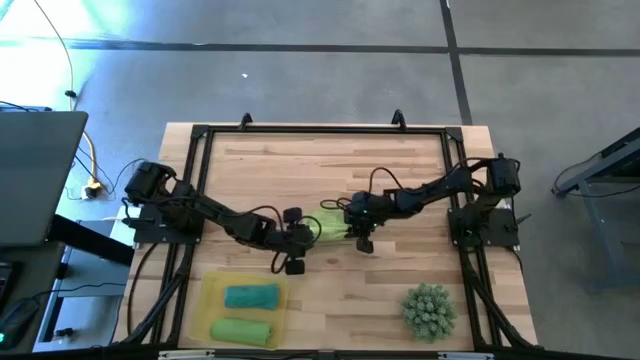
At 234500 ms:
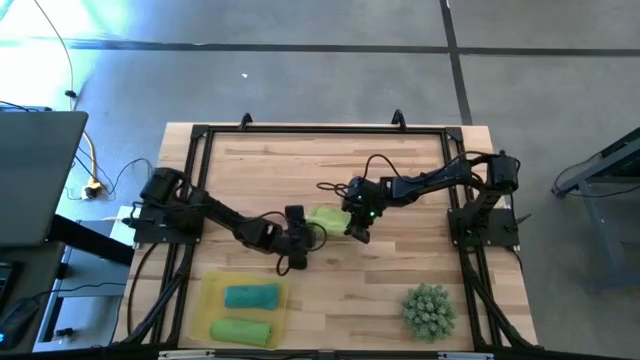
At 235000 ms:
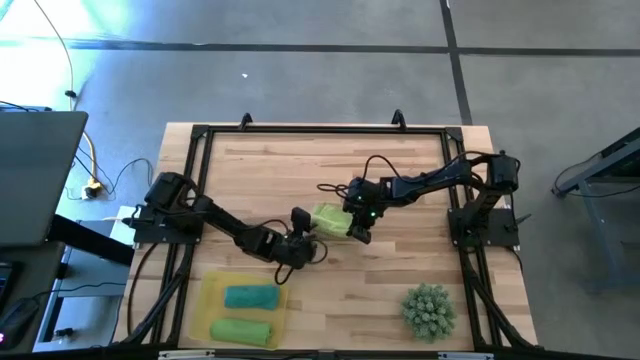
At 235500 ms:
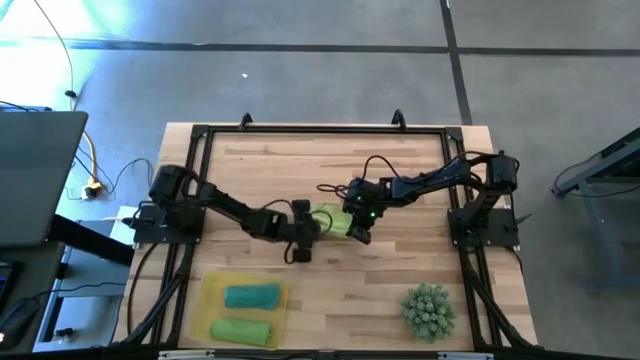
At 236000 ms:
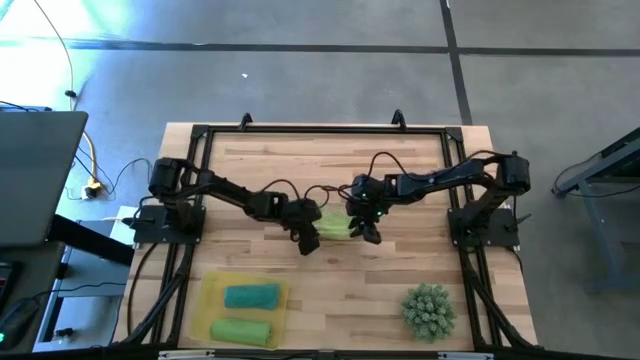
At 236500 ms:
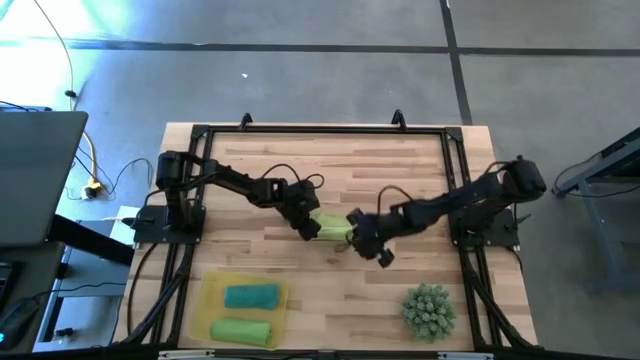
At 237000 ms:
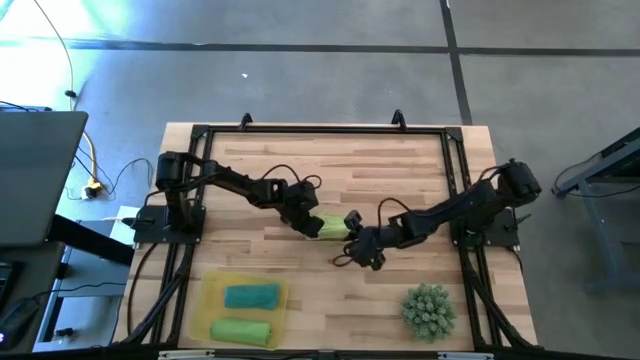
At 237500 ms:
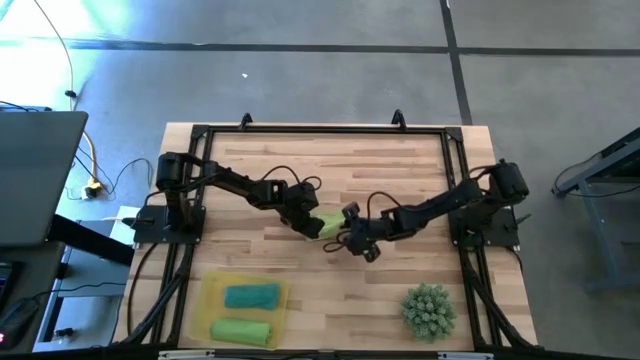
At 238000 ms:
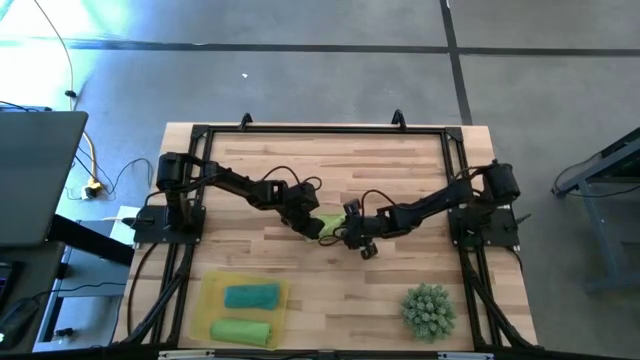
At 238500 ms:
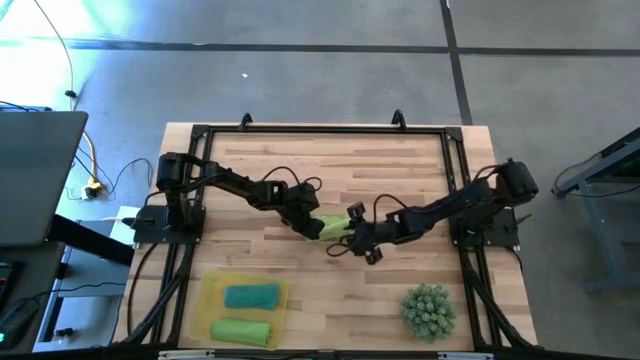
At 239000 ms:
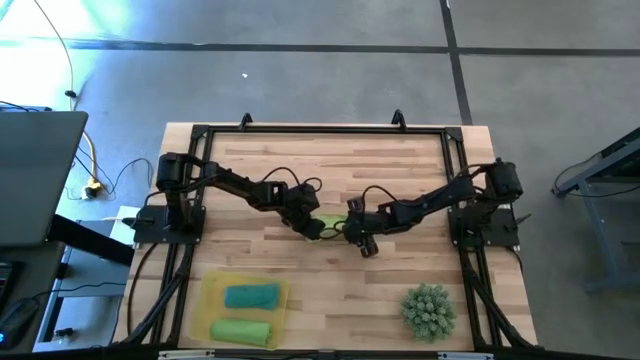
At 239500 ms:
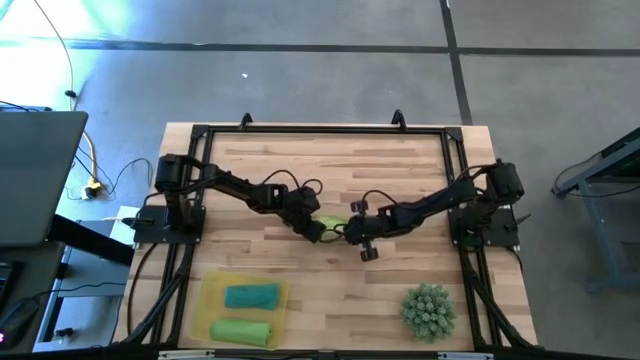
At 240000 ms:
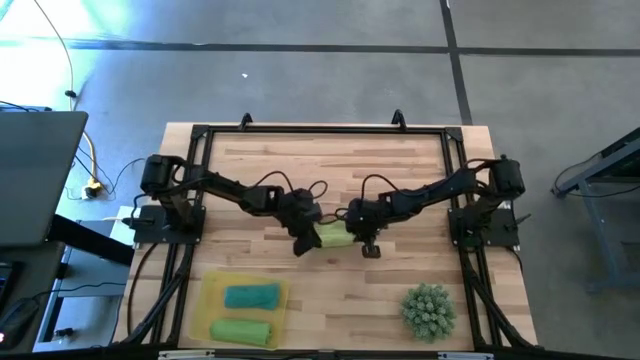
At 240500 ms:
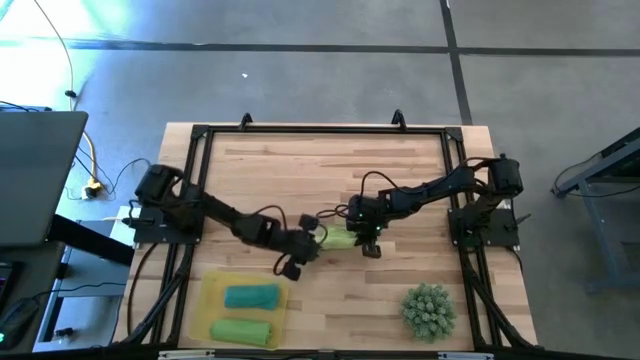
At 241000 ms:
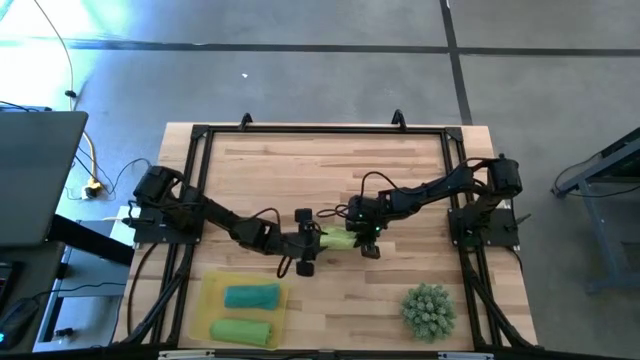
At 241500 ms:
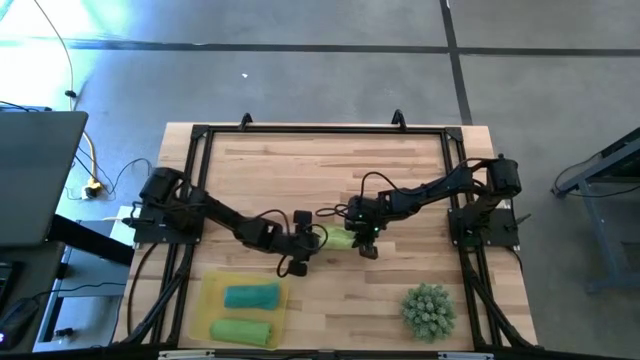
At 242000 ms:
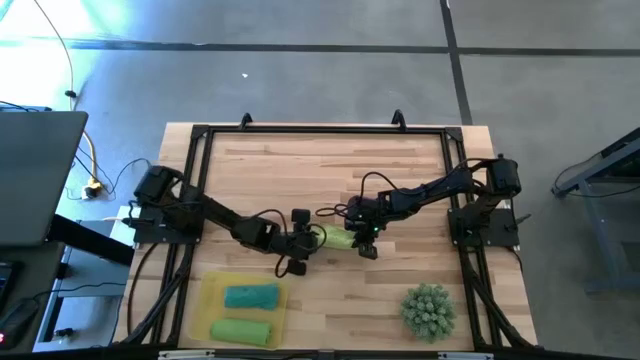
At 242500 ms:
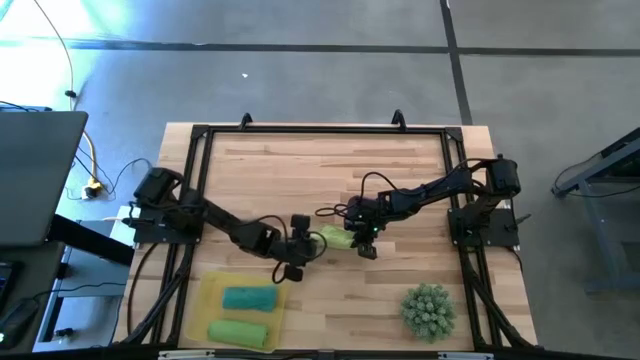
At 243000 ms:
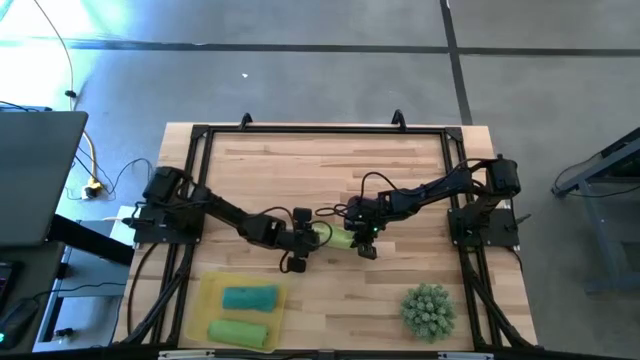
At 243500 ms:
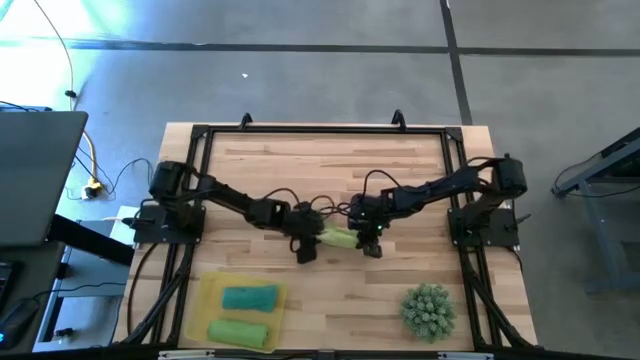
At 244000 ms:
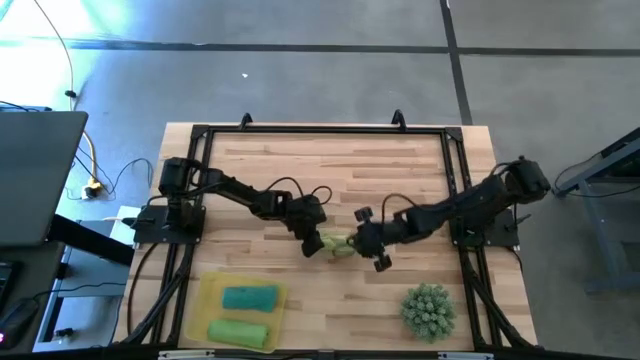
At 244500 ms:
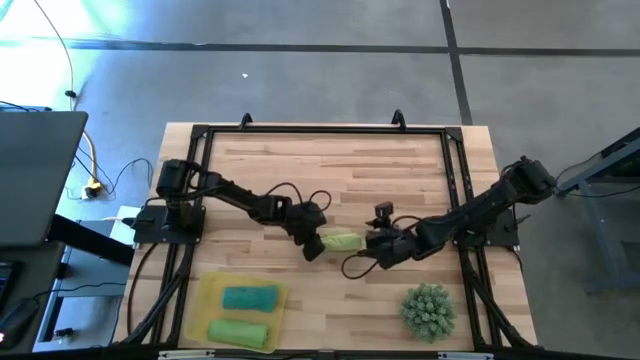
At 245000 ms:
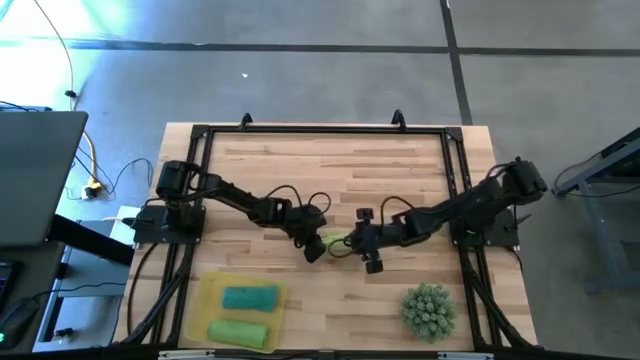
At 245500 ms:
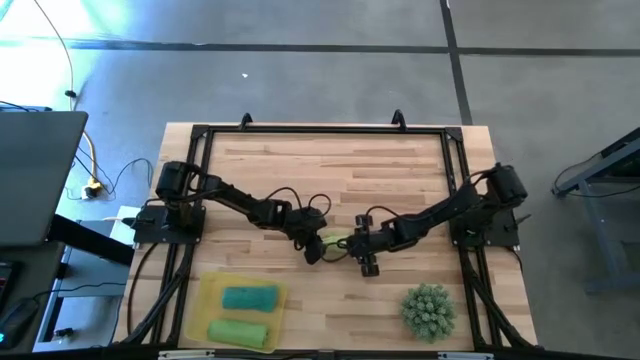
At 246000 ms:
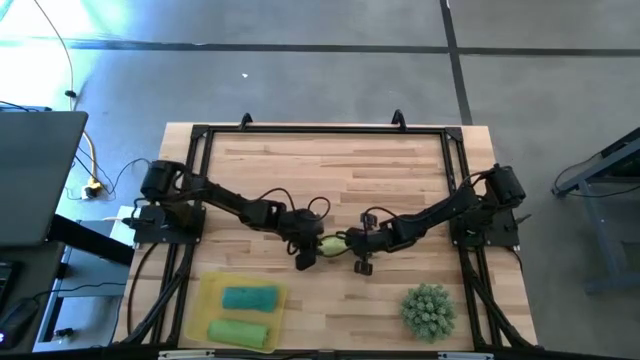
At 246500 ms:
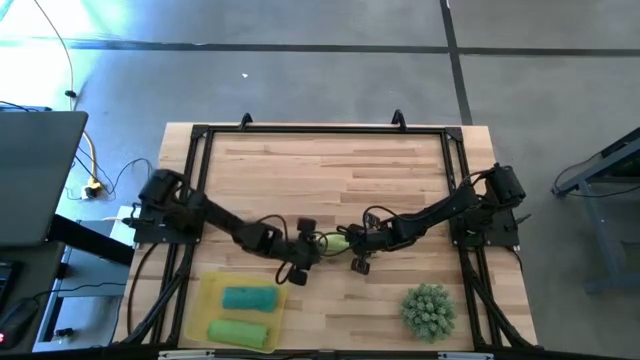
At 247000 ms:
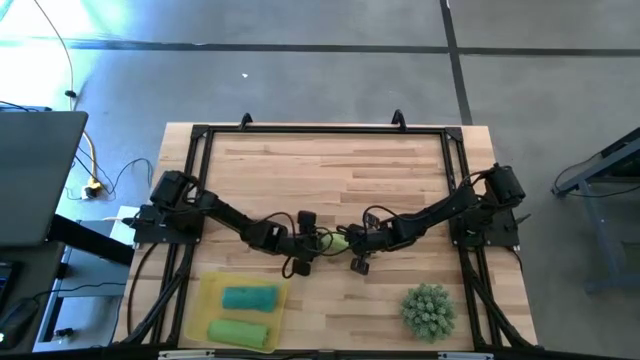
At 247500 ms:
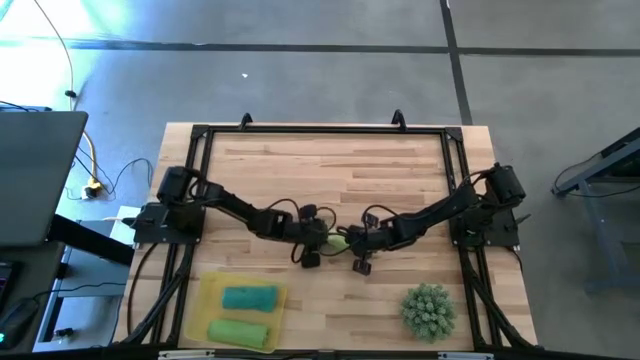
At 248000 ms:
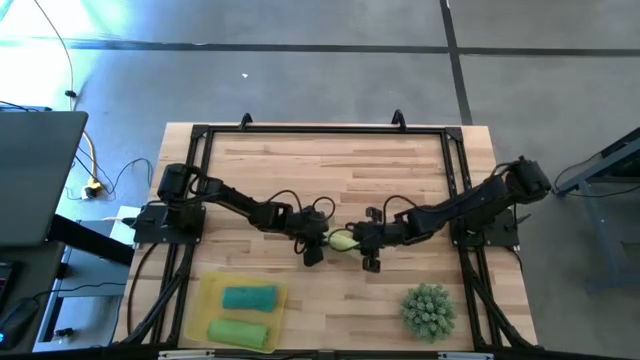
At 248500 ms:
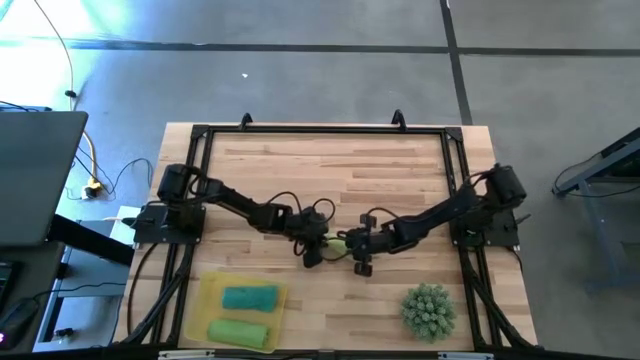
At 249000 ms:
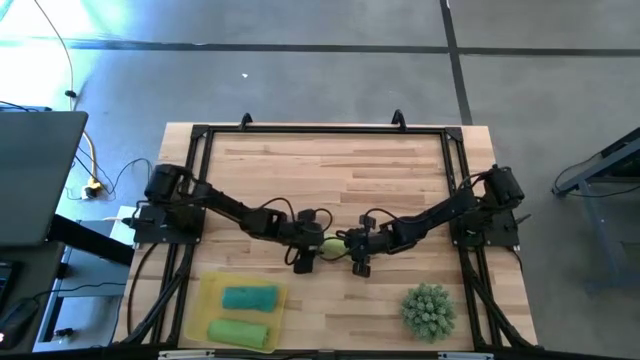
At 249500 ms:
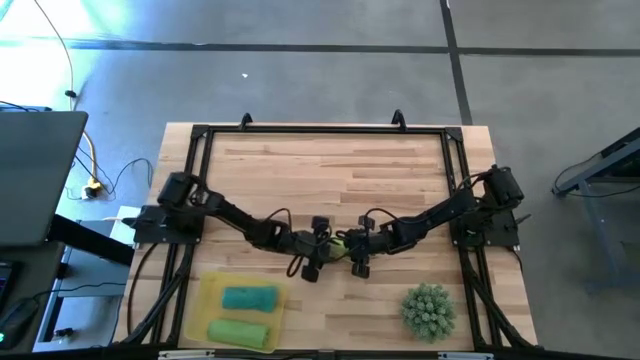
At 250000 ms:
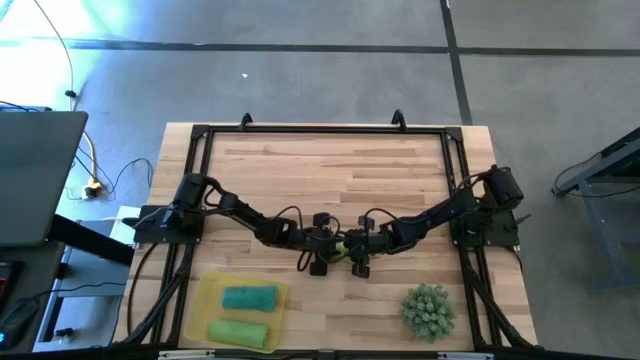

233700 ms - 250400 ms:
Task: Roll microfiber towels into tight, uniform cylinder then place into a basket
Roll the light green microfiber towel

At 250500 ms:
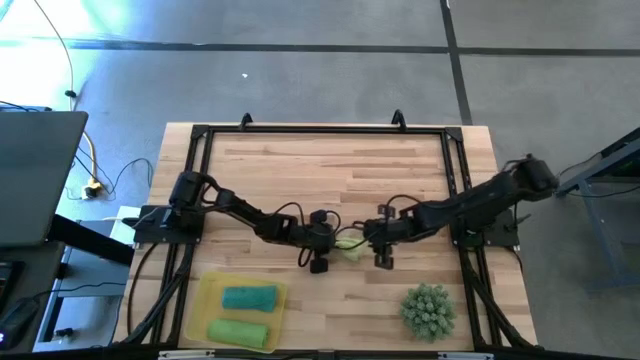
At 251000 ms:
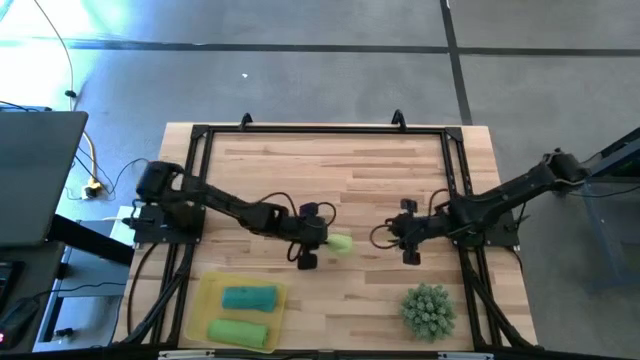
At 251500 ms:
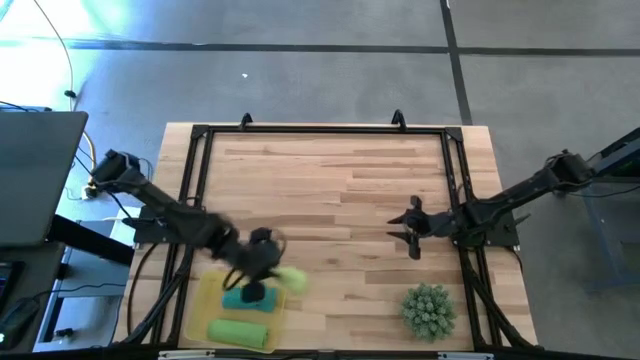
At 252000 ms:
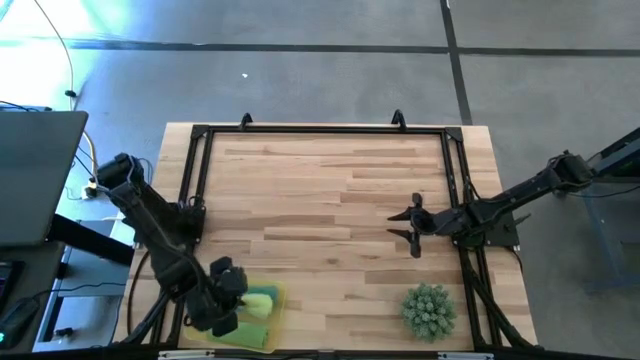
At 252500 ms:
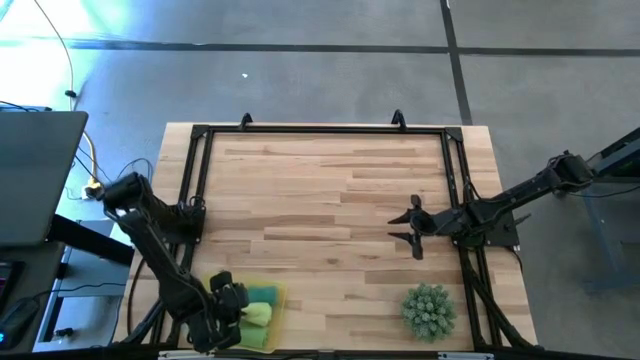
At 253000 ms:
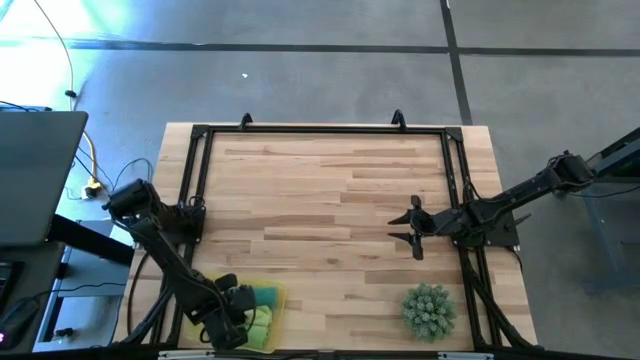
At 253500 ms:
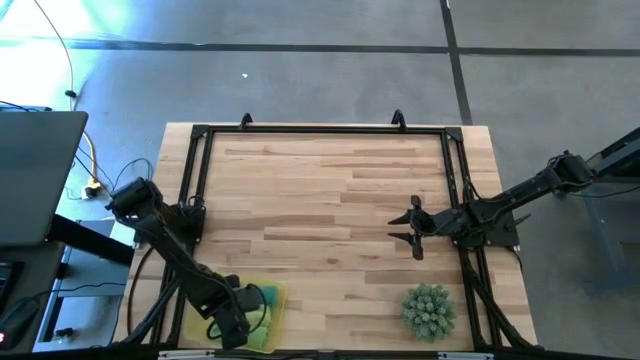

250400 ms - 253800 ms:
Put the light green microfiber towel into the yellow bin
